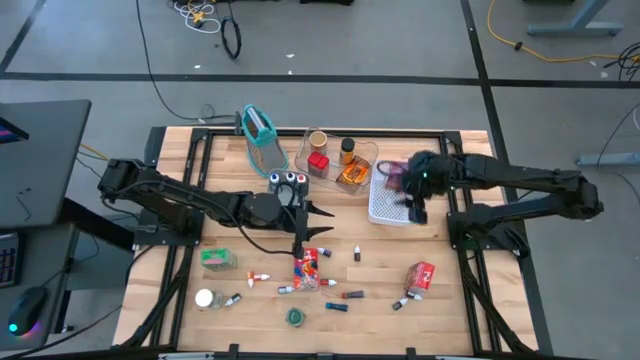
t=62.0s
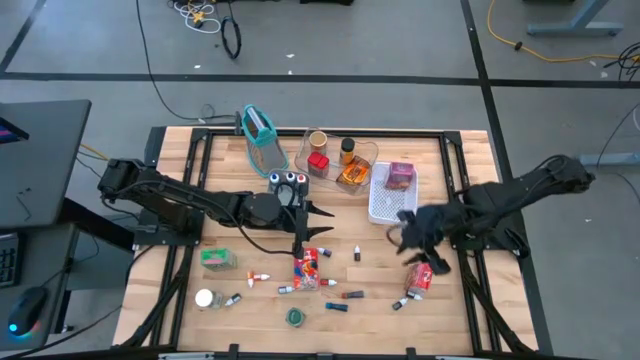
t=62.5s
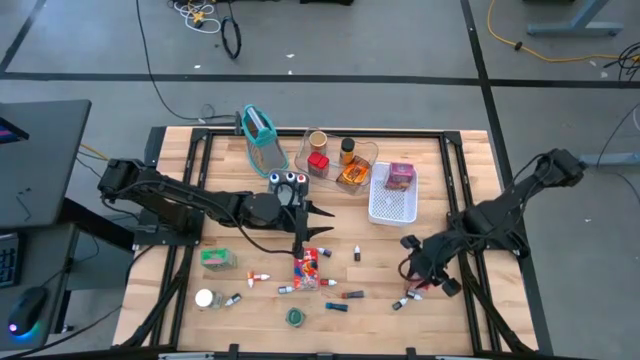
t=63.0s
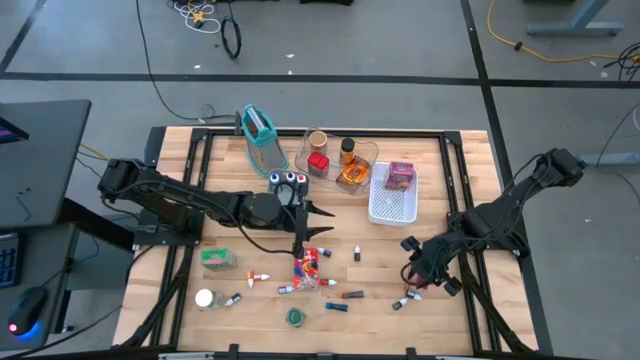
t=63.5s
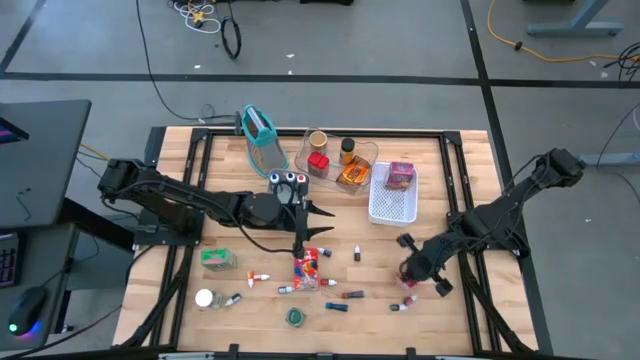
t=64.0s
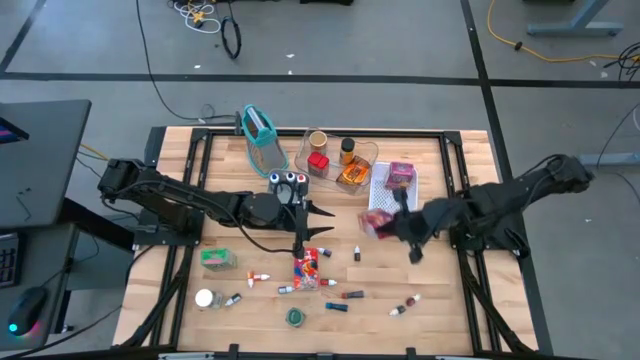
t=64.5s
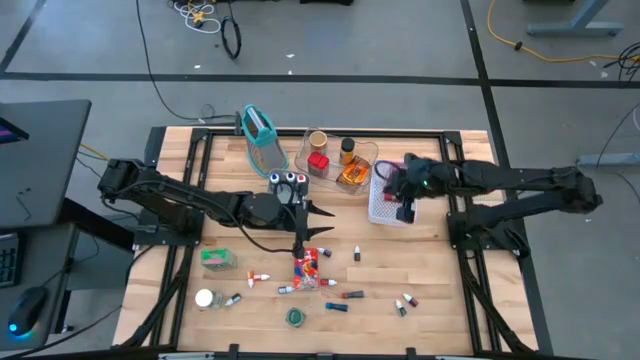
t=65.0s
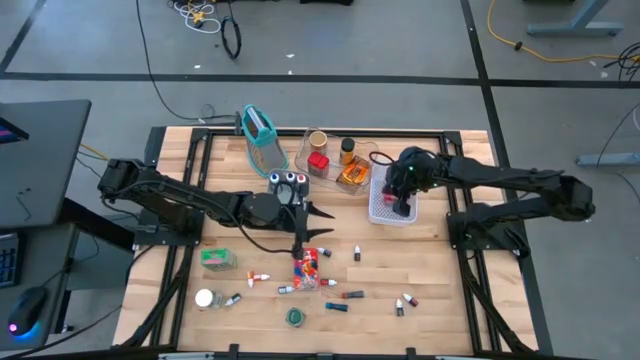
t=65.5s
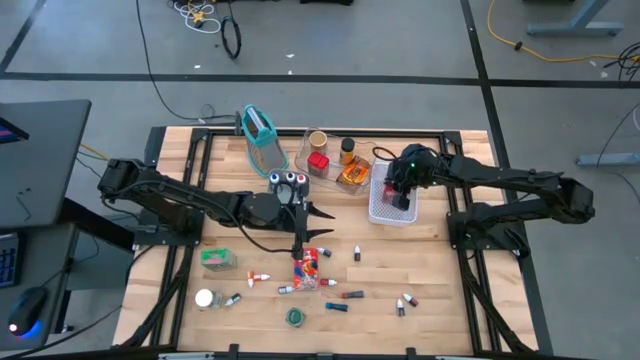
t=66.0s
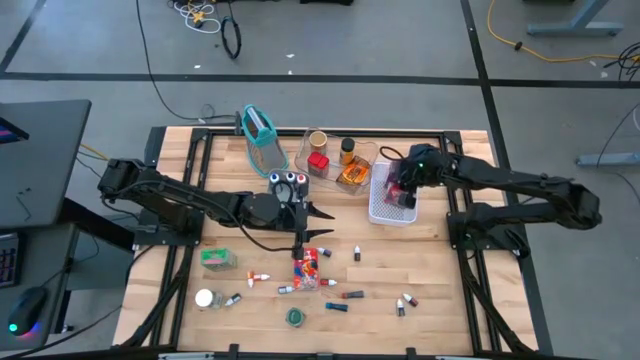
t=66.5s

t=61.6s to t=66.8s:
Task: Pick & Place Kitchen Items
Put the red cereal box into the white bin

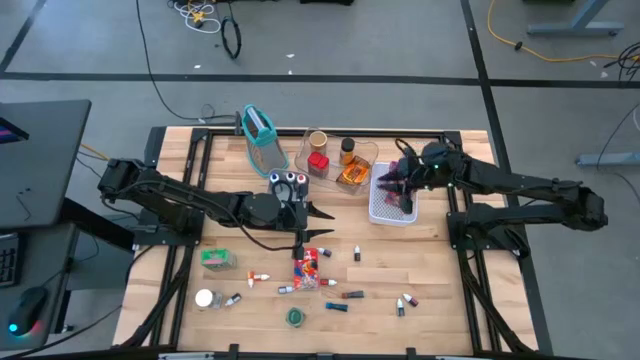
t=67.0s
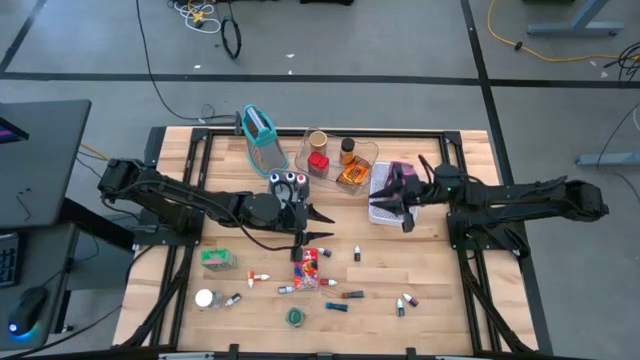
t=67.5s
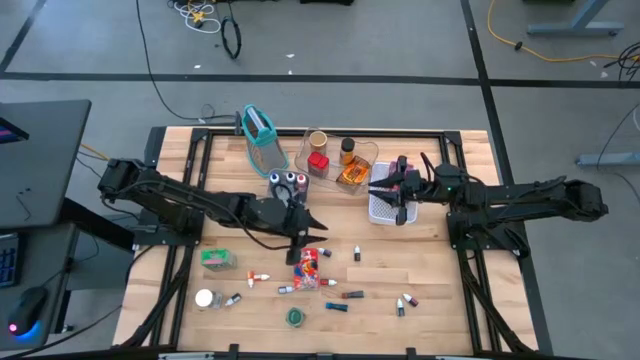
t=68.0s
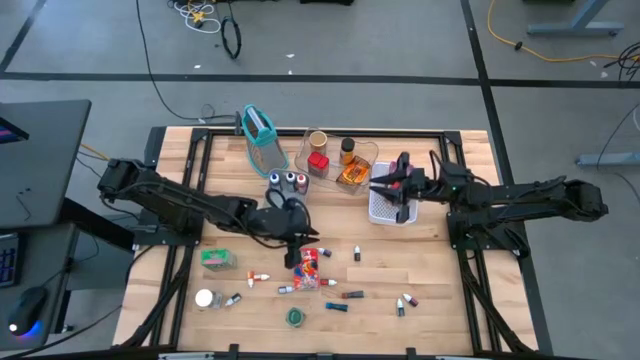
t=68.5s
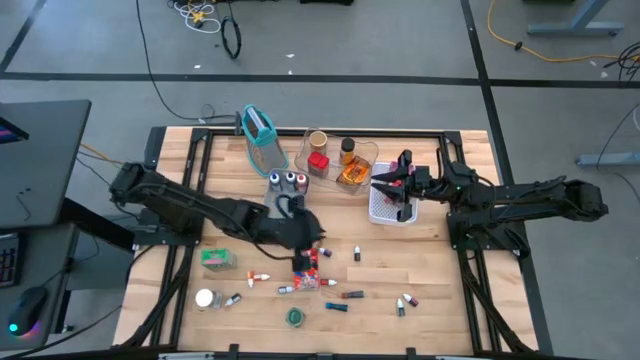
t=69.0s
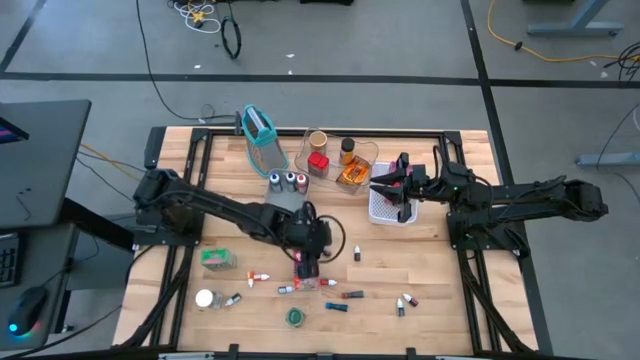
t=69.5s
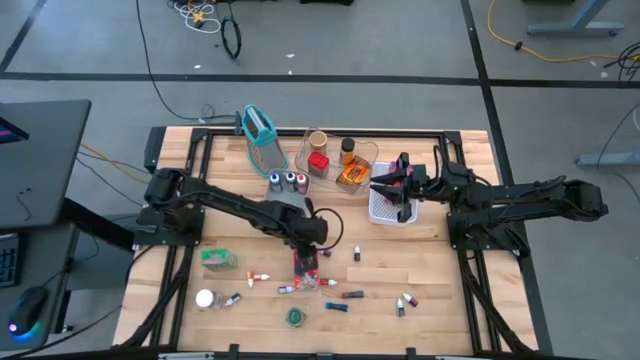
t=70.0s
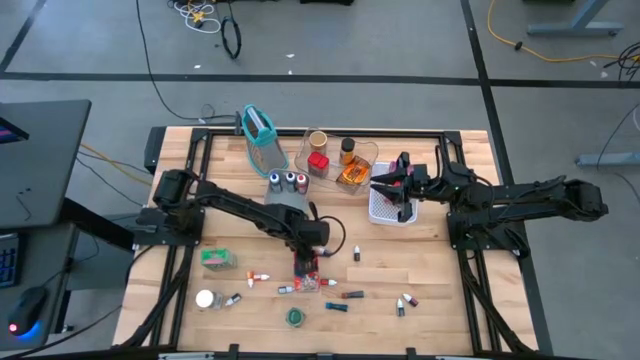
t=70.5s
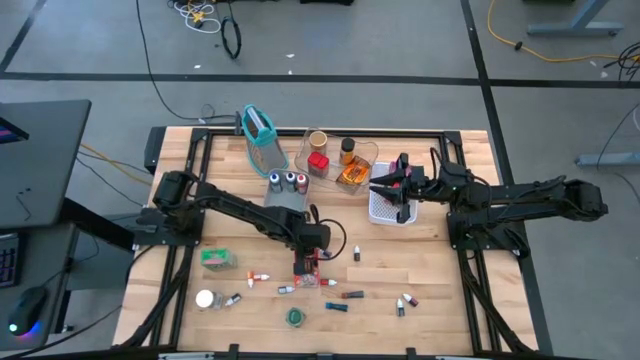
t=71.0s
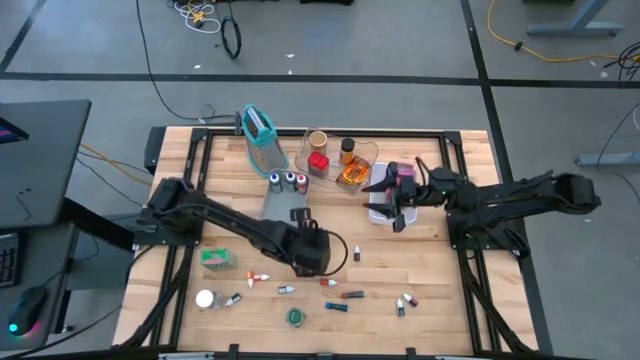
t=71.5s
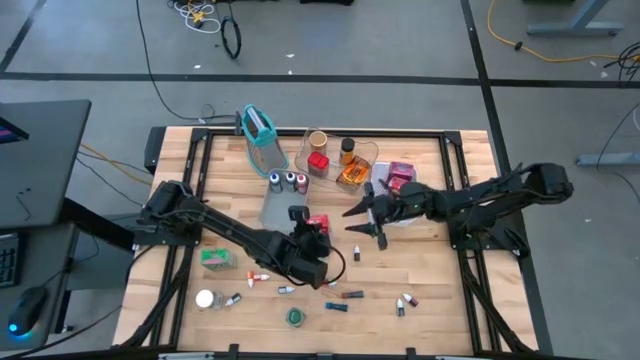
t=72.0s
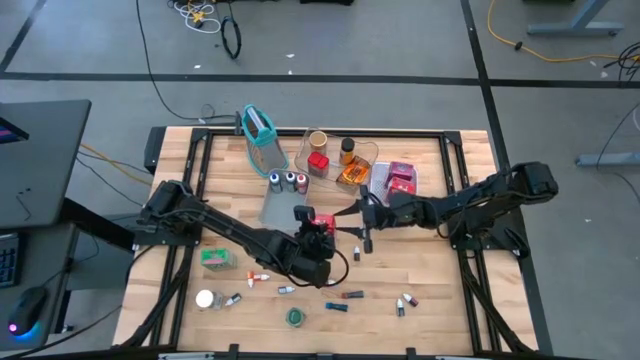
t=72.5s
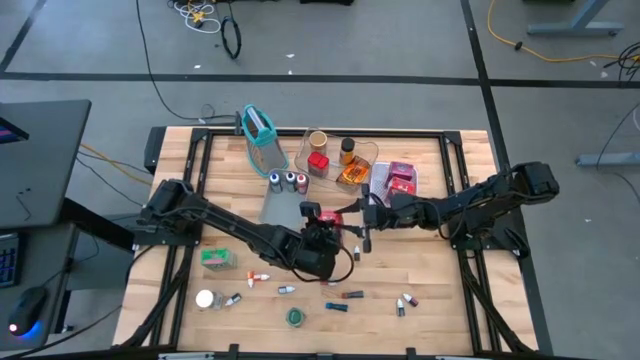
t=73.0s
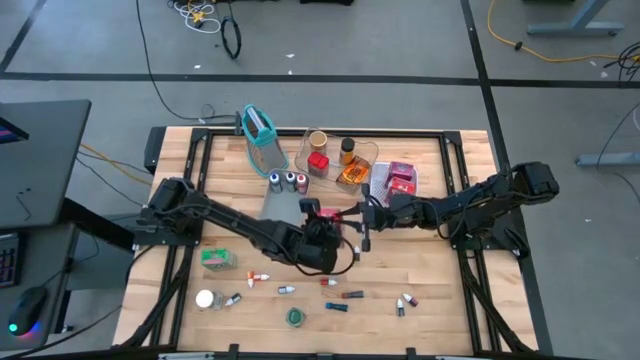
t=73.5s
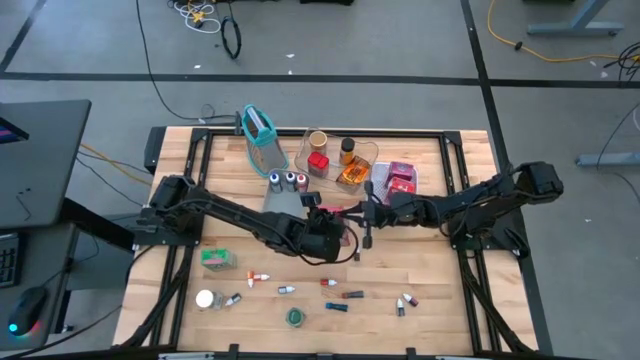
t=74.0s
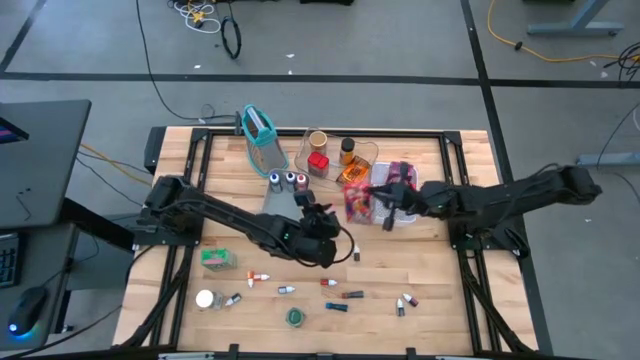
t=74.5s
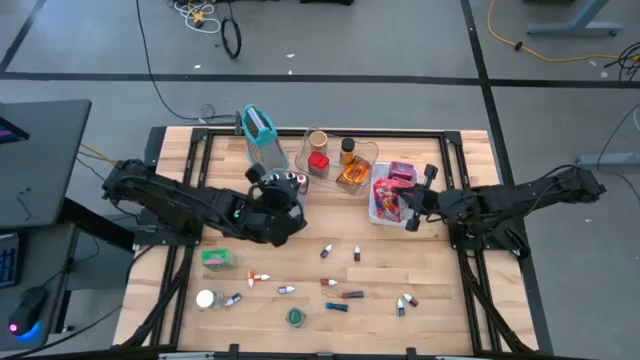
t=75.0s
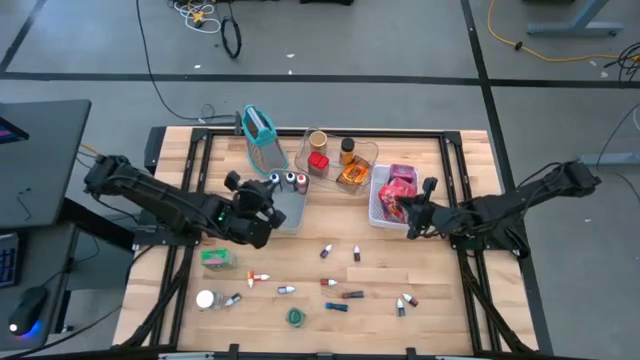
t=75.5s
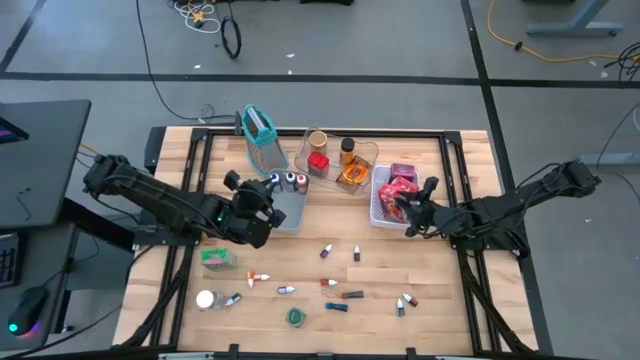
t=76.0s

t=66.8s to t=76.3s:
Put the red cereal box into the white bin

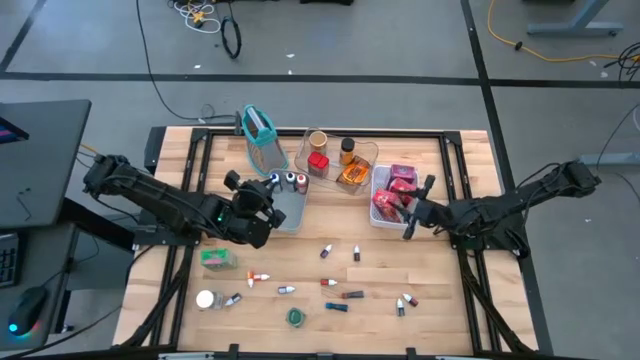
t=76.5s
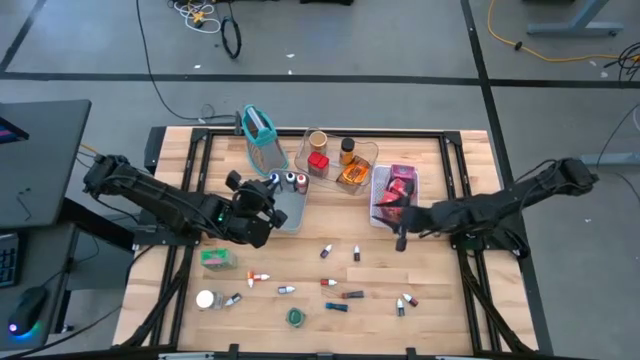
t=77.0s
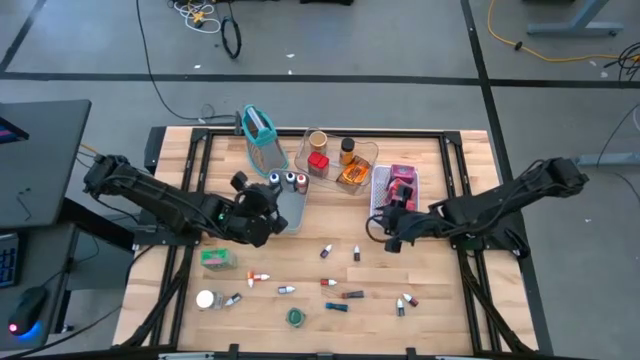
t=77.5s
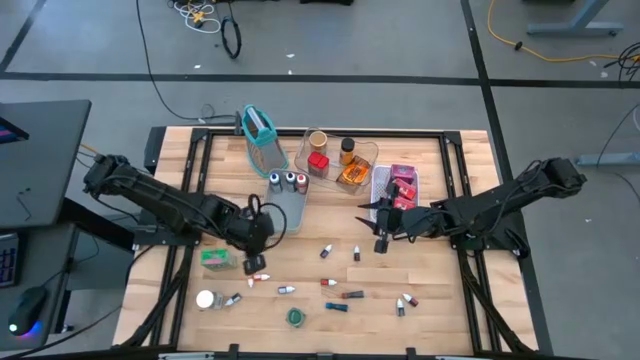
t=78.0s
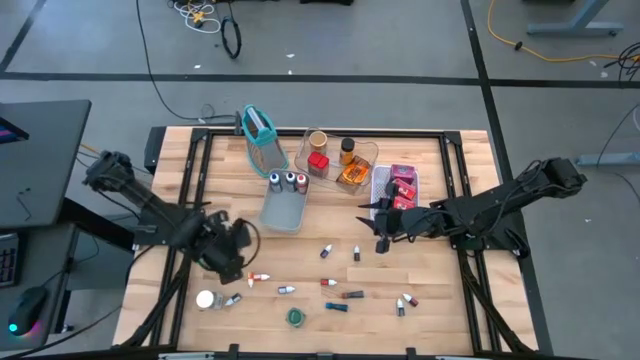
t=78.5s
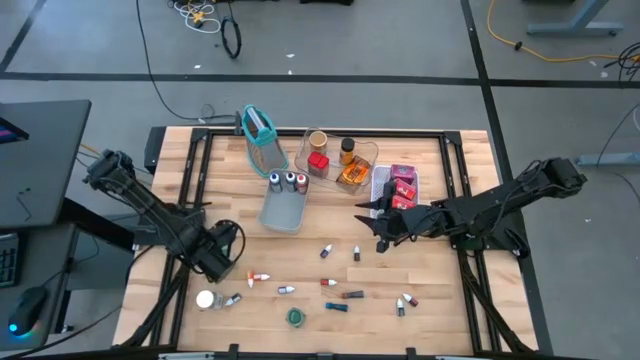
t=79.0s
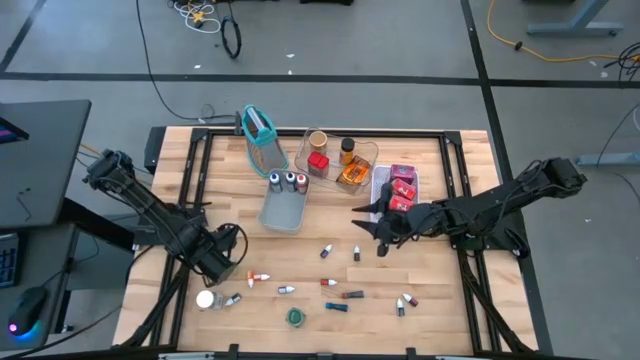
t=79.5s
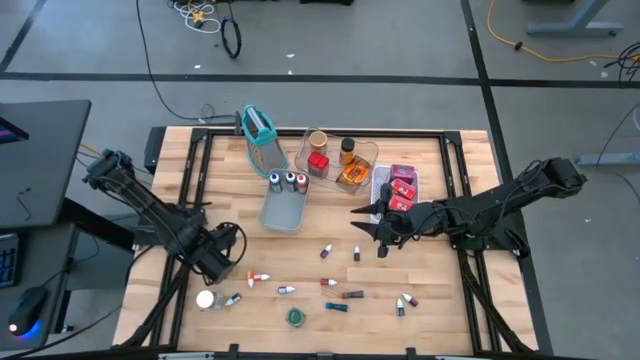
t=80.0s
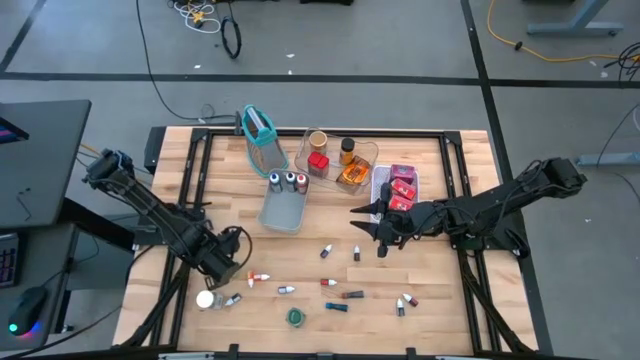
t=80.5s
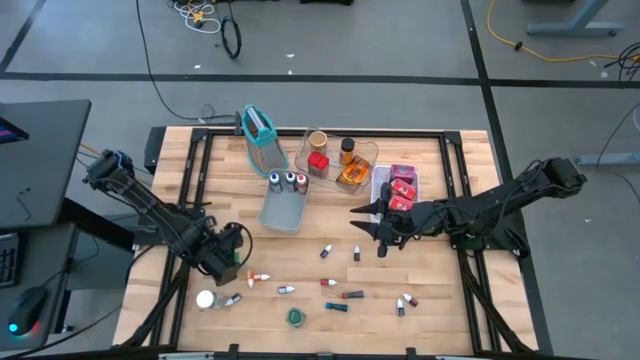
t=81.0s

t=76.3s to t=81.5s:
Put the green cereal box into the white bin

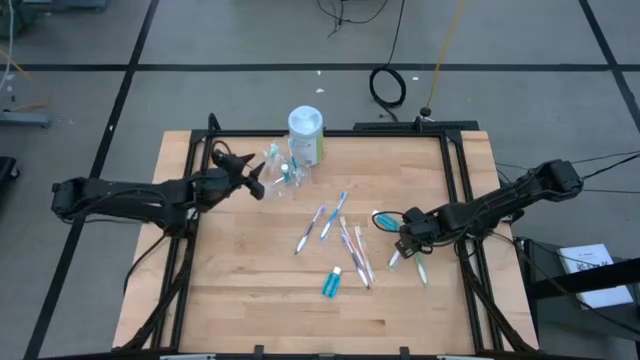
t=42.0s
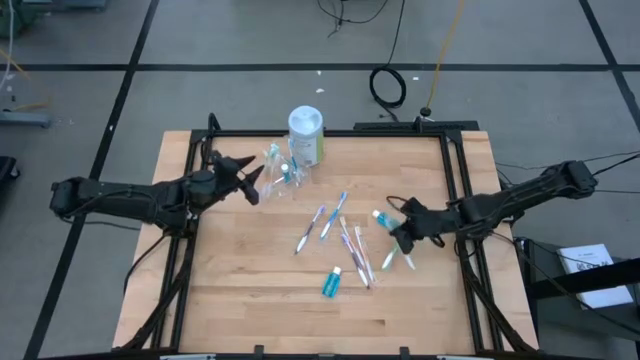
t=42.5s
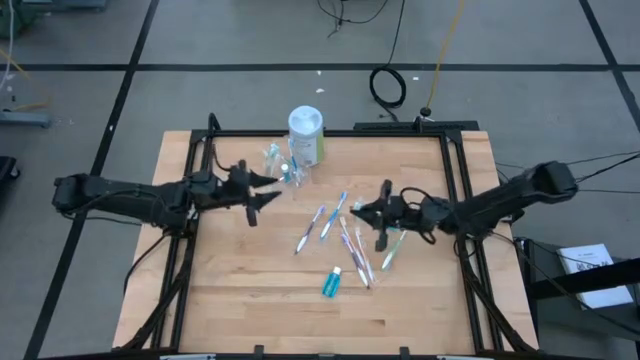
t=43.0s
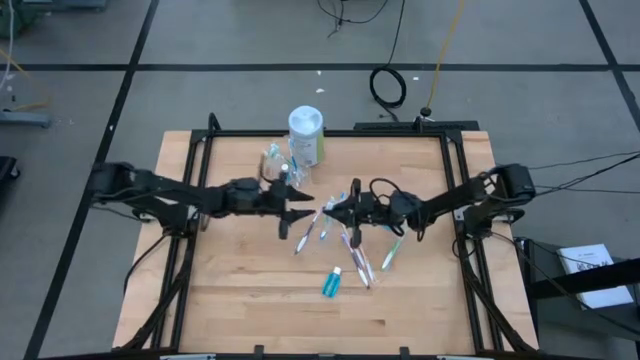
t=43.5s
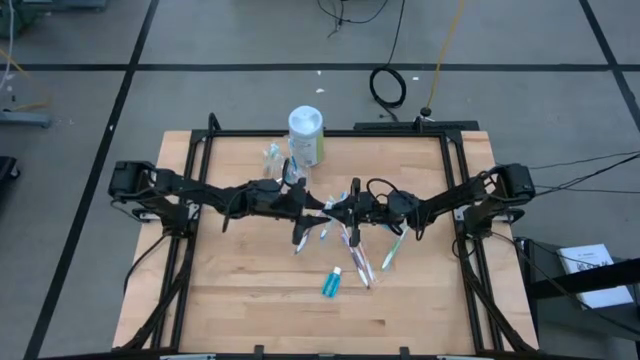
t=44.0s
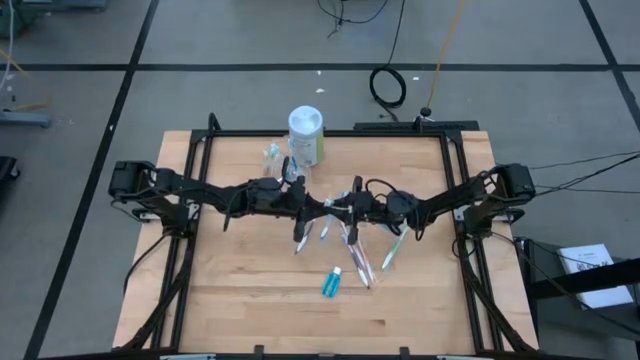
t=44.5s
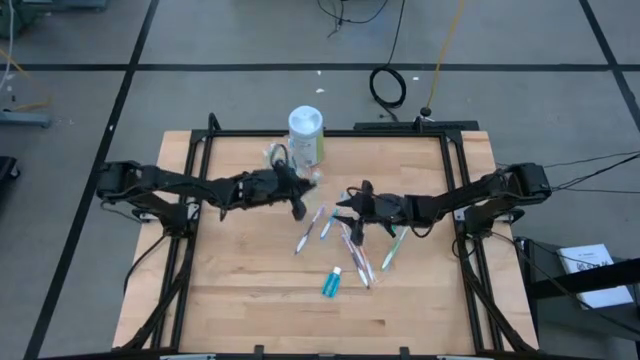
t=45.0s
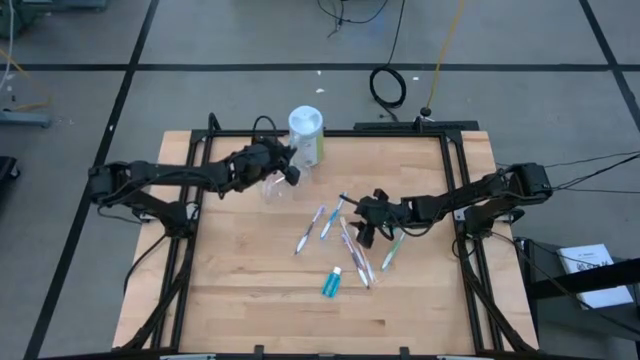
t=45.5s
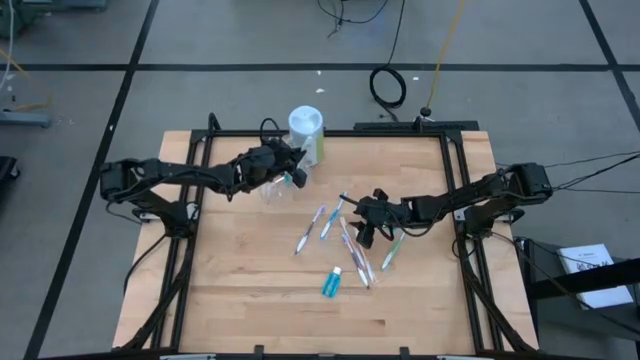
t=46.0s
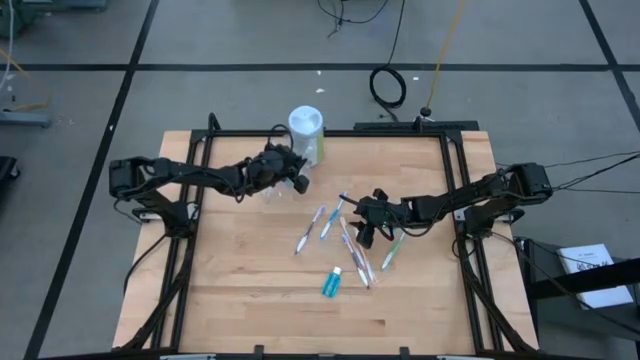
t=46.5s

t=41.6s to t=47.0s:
Task: Pick & Place toothbrushing station
Put the green toothbrush into the transparent organizer
